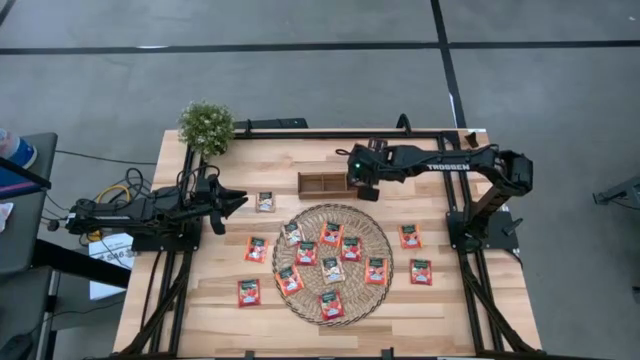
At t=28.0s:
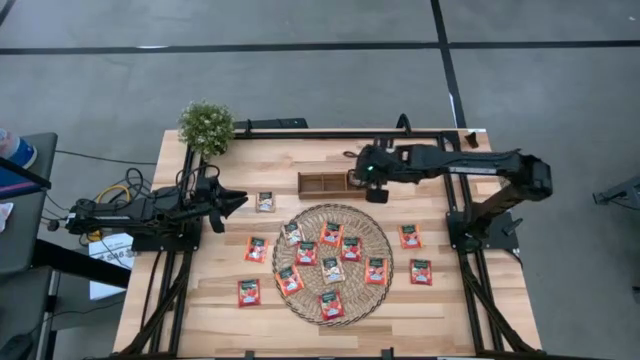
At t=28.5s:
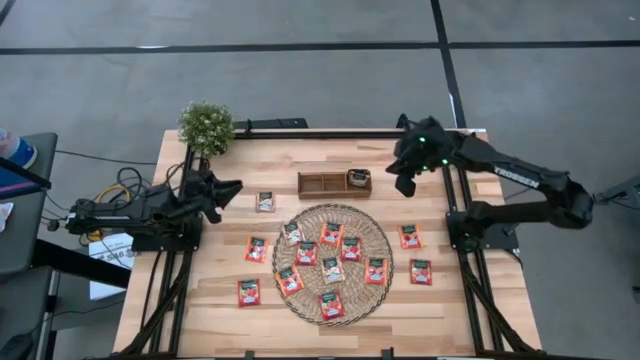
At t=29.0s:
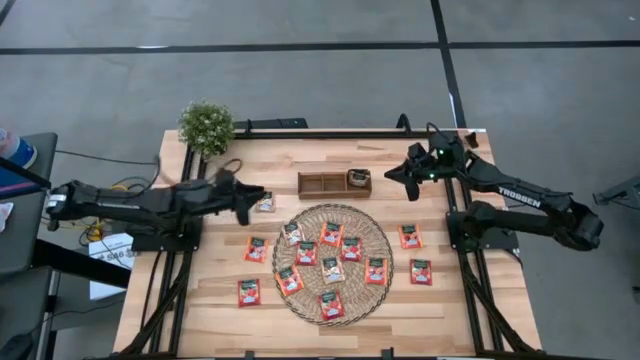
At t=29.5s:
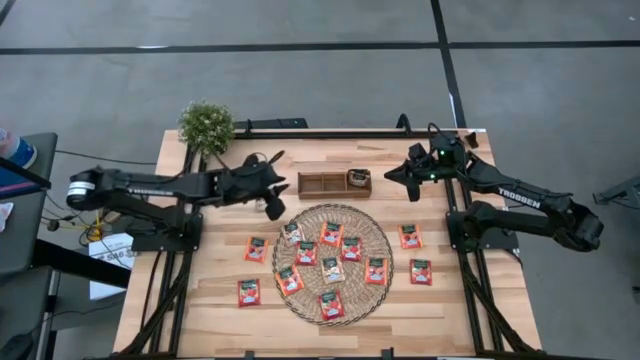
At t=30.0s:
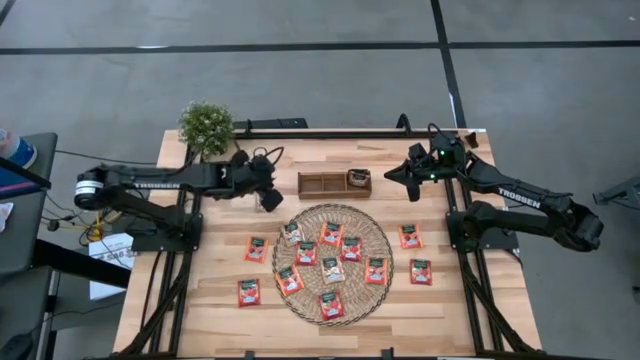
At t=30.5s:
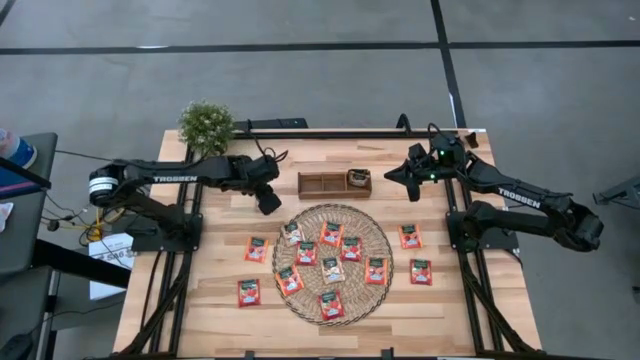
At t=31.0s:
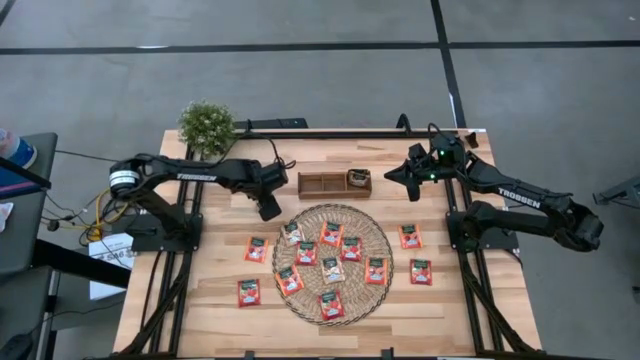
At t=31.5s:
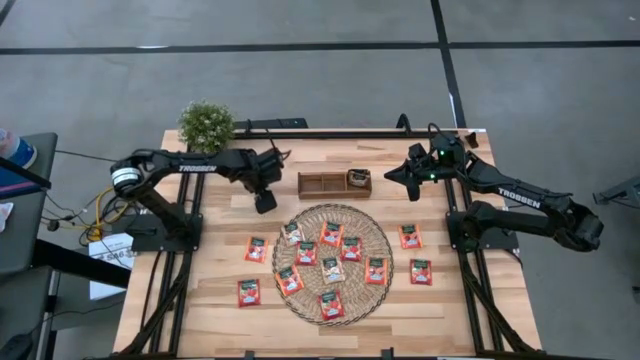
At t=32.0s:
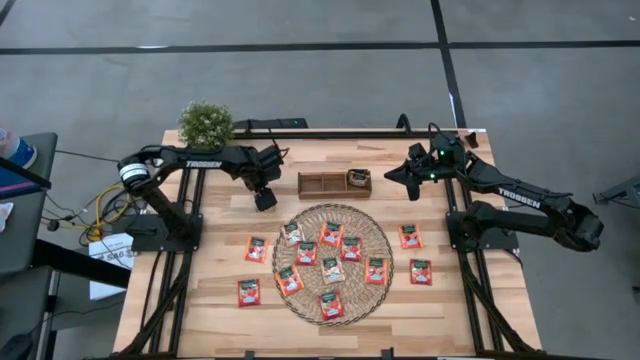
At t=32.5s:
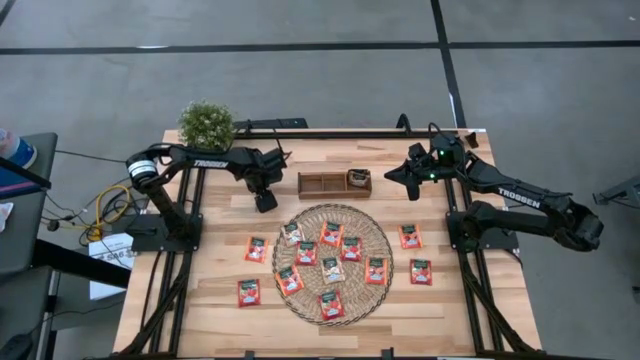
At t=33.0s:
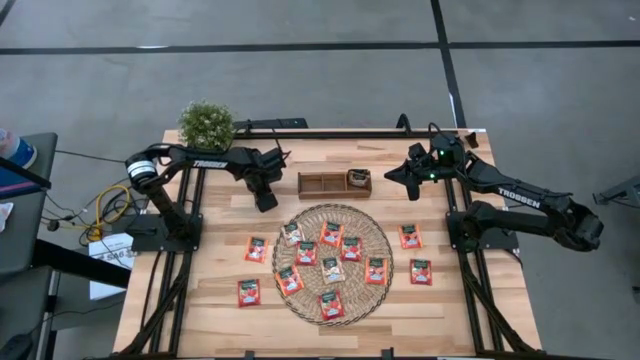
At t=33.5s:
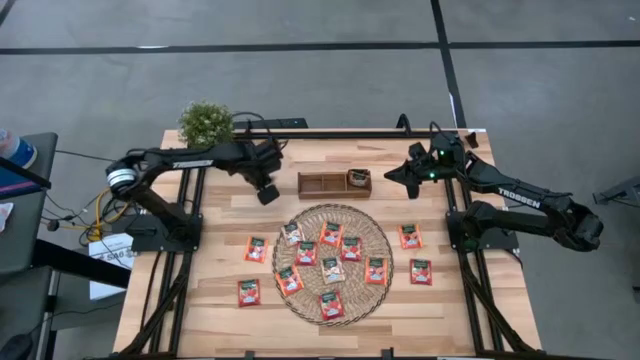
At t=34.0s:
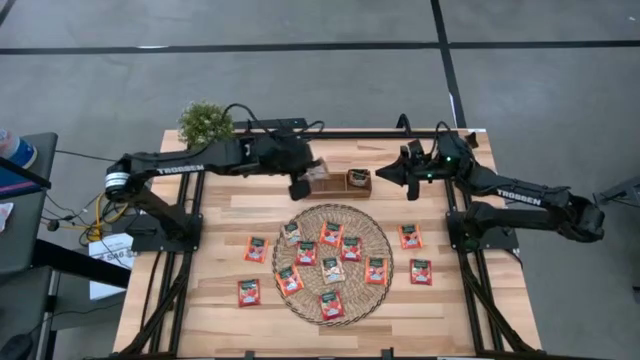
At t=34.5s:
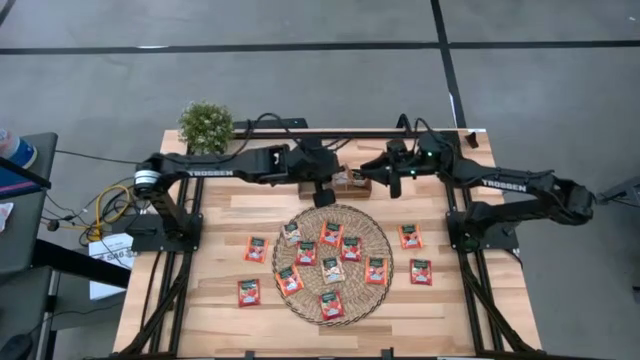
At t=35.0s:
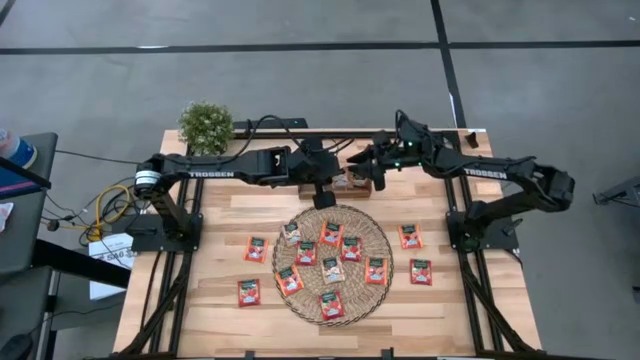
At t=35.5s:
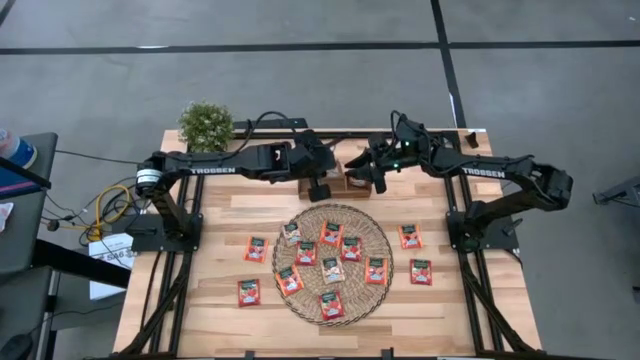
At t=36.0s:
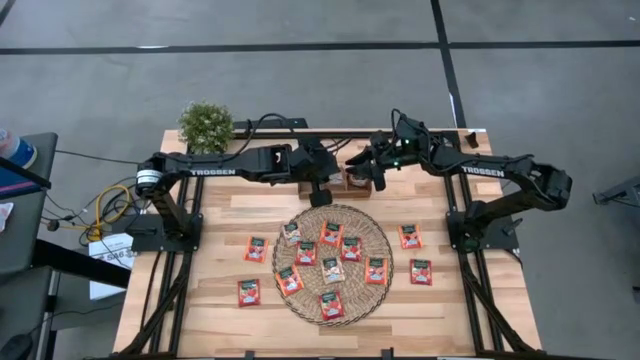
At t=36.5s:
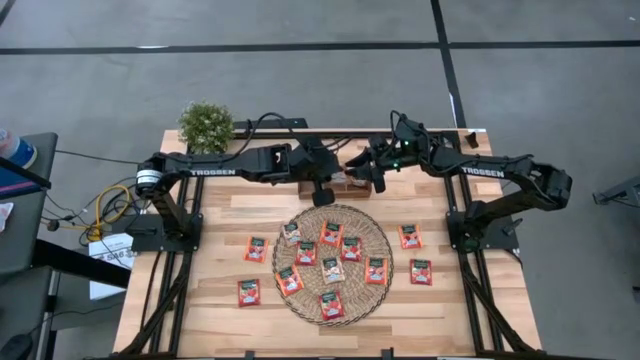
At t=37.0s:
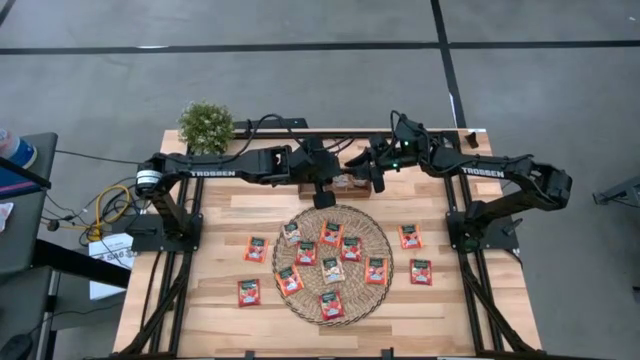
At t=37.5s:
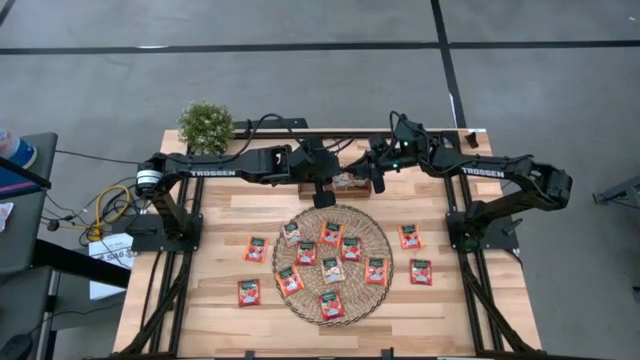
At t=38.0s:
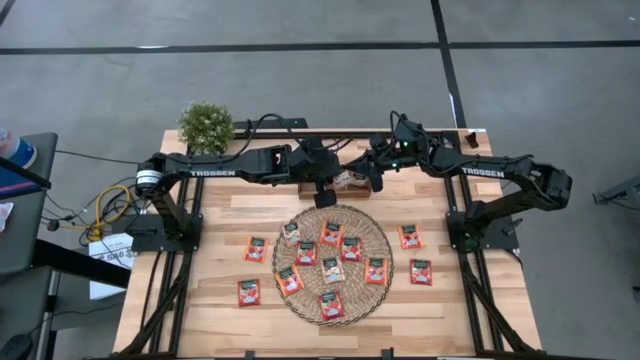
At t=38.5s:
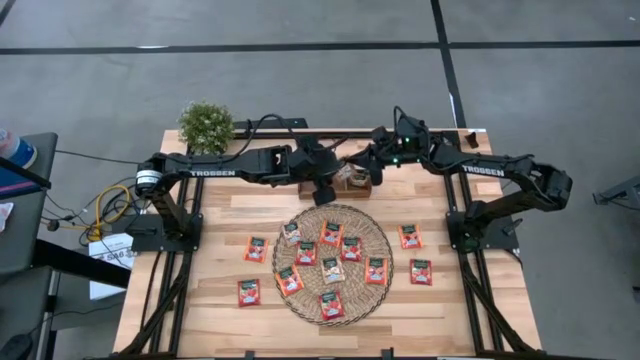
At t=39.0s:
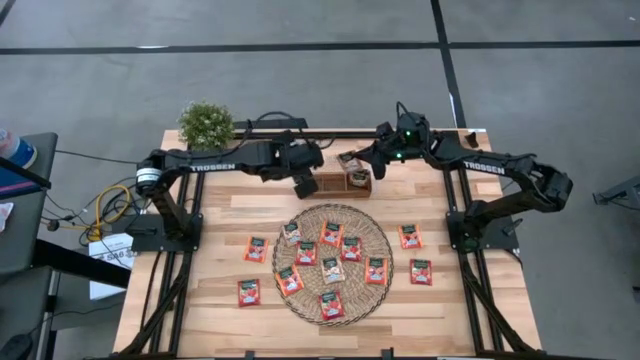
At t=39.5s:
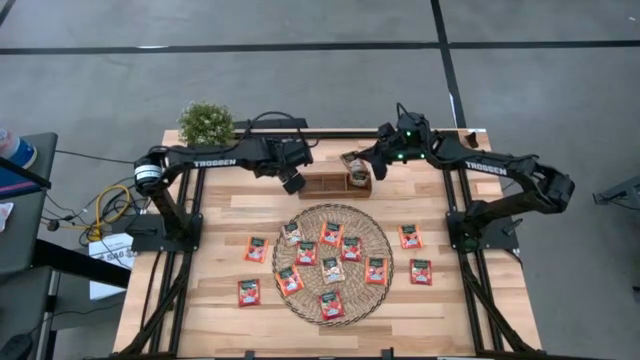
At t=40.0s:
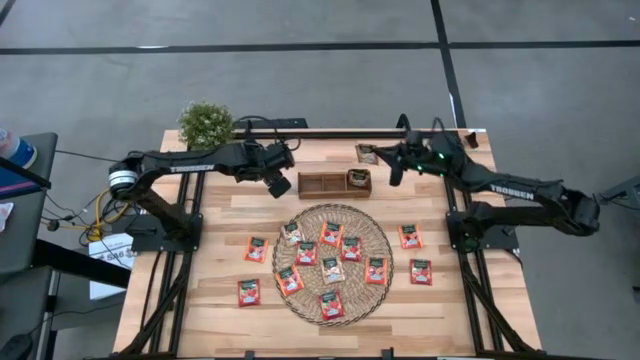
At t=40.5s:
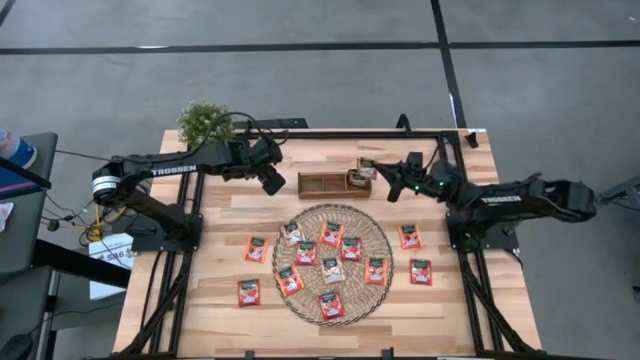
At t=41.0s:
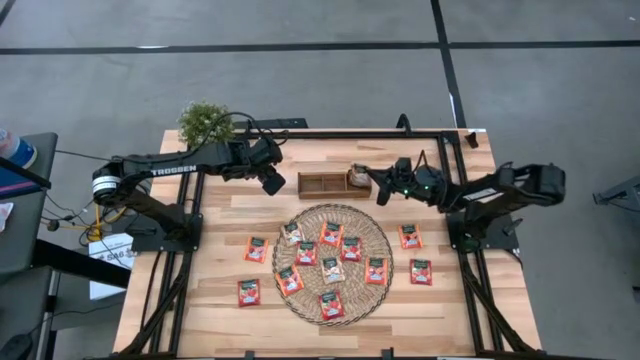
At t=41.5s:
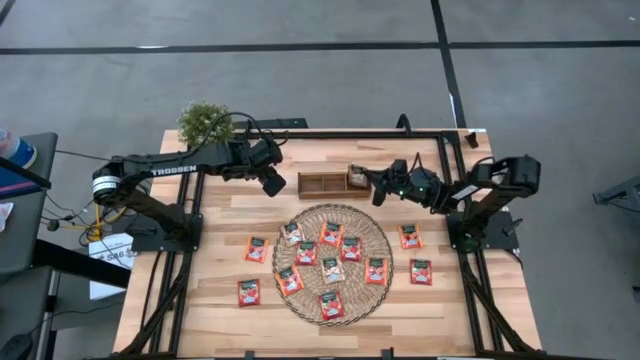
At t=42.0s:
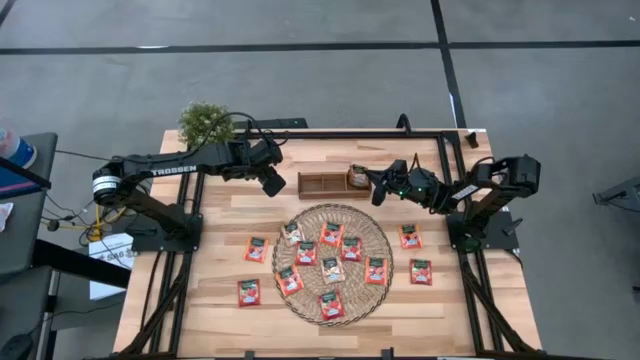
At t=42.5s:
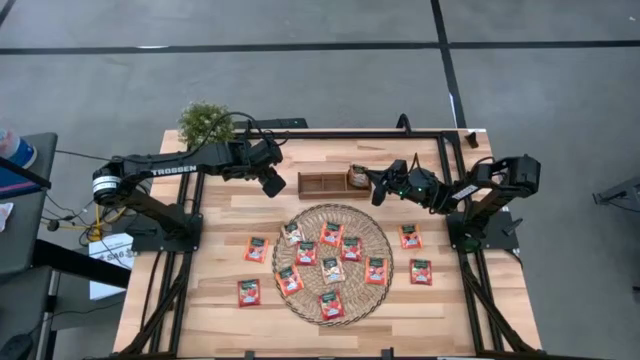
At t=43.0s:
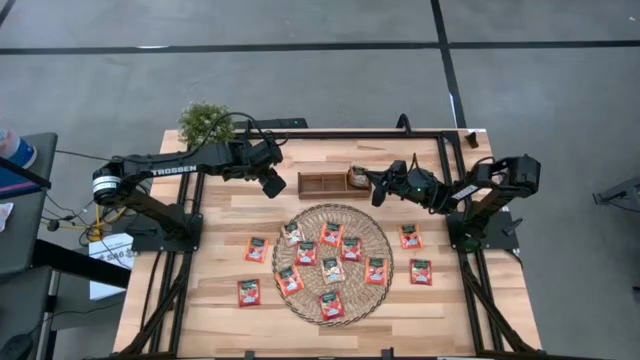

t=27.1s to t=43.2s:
Task: Pick & Place Tea
Put the gold tea bag into the wooden organizer

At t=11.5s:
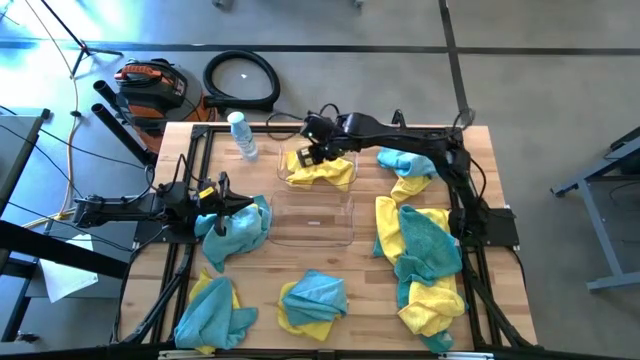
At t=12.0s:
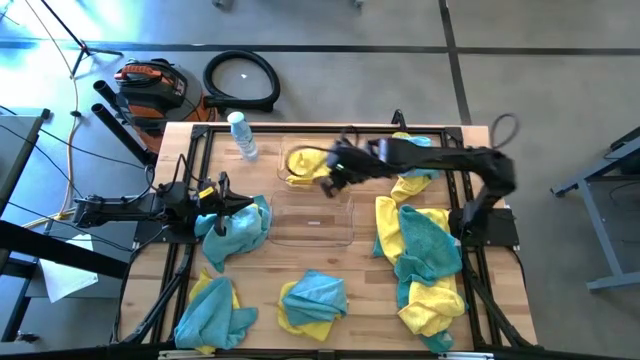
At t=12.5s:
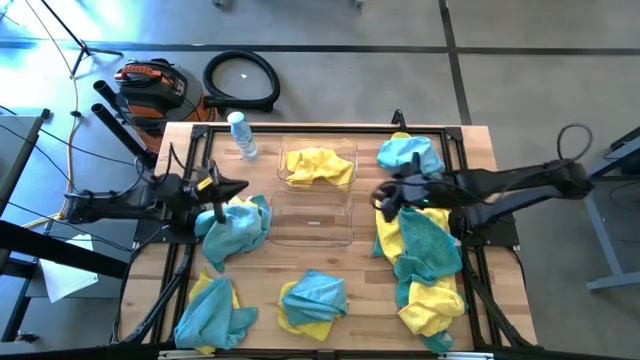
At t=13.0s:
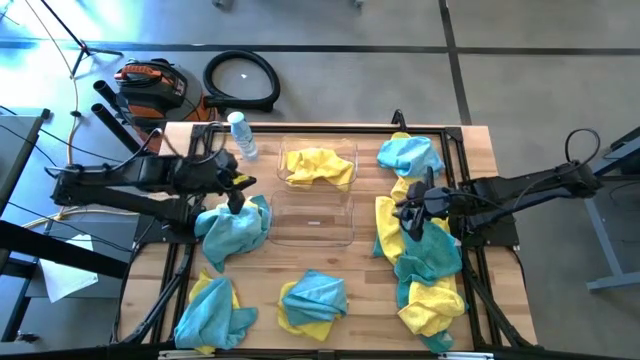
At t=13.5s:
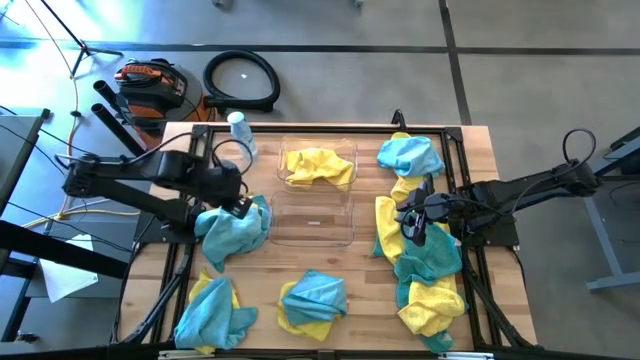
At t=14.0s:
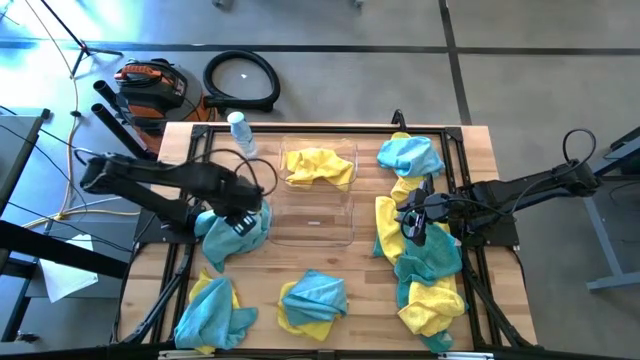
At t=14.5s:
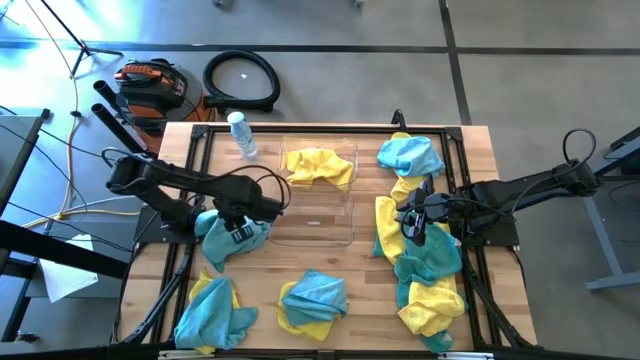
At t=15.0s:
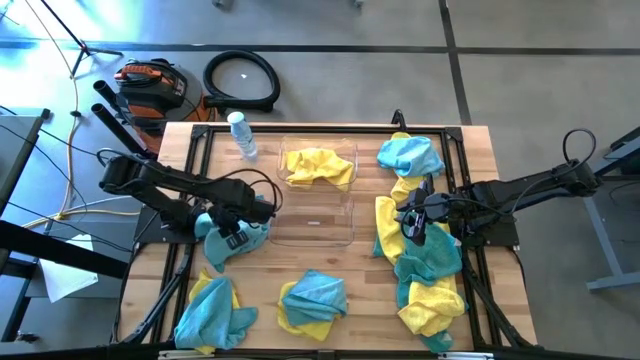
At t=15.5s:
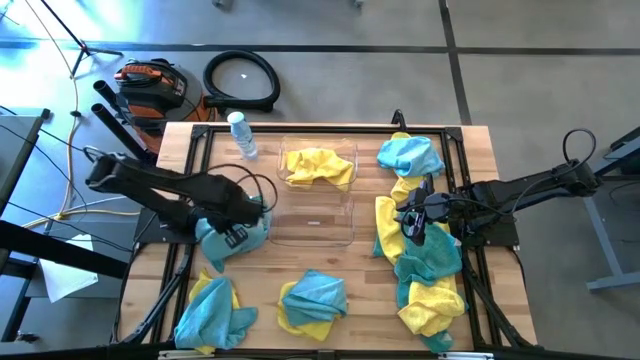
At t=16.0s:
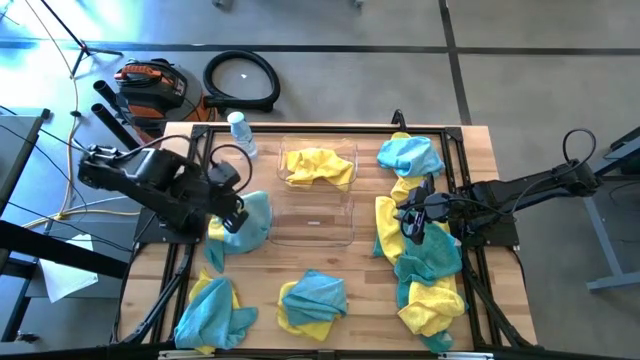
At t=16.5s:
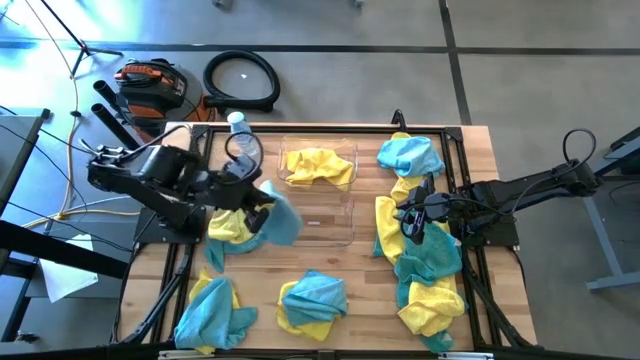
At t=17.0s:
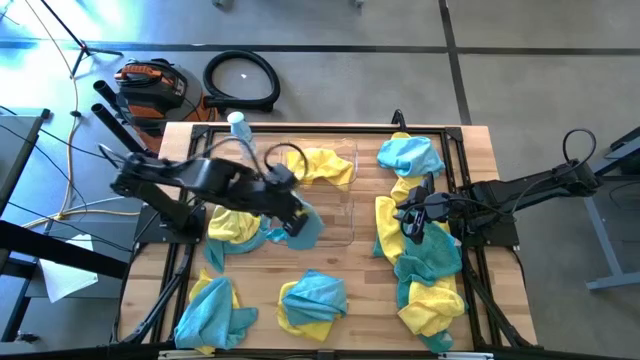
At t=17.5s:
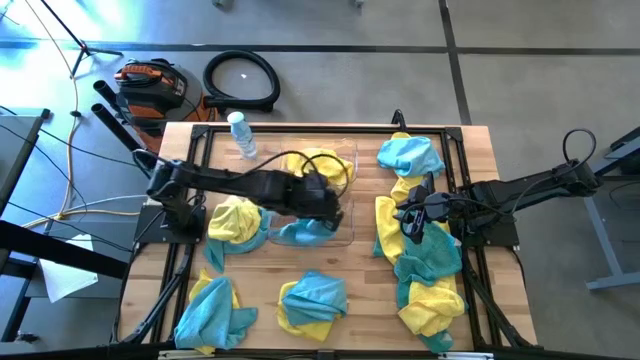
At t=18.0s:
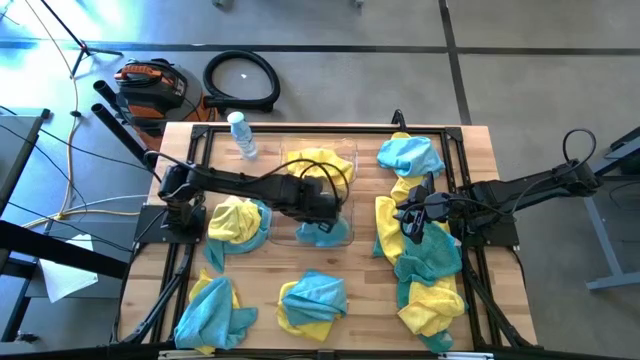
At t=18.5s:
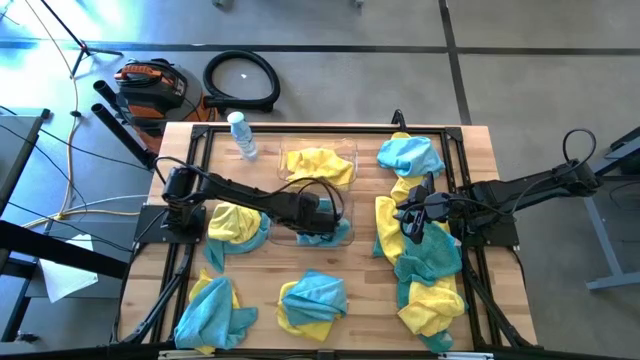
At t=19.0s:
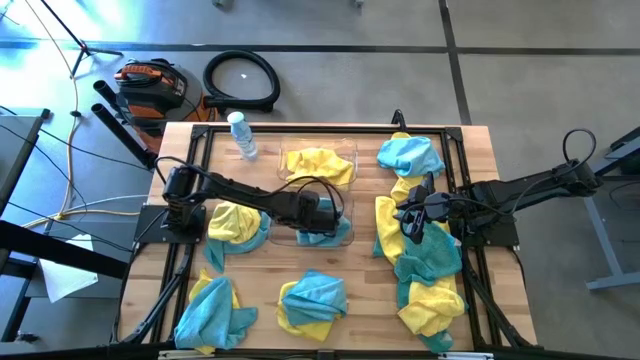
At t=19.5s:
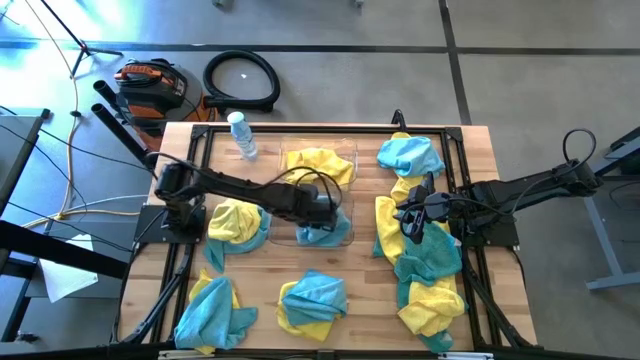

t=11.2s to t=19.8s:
Task: Sort microfiber towel by color & place in baskets
Put the blue microfiber cloth into the bottom transparent bin
